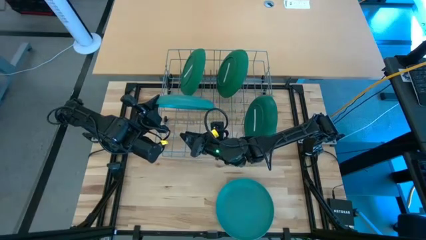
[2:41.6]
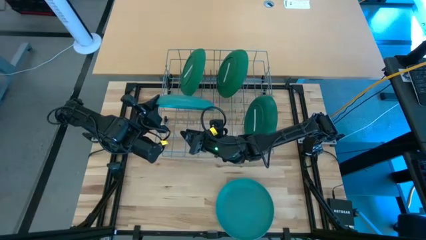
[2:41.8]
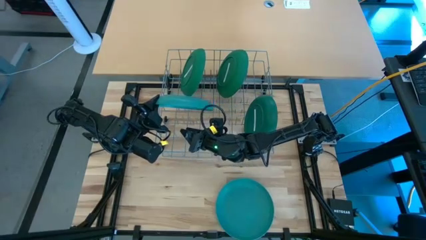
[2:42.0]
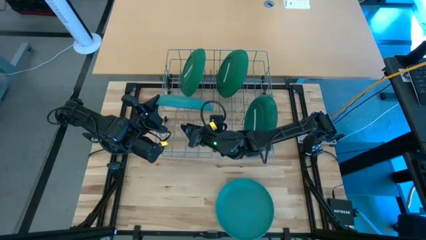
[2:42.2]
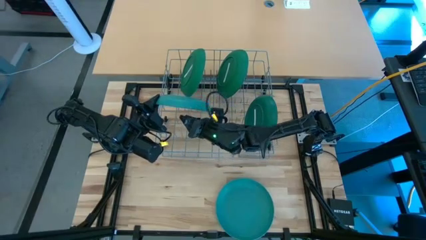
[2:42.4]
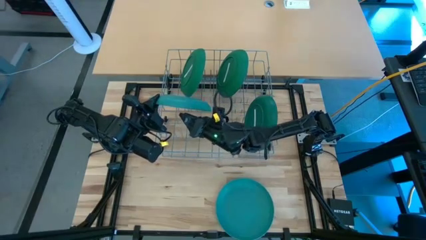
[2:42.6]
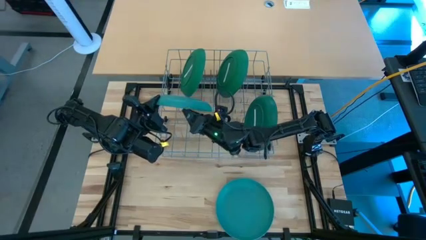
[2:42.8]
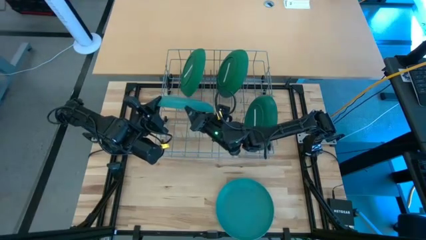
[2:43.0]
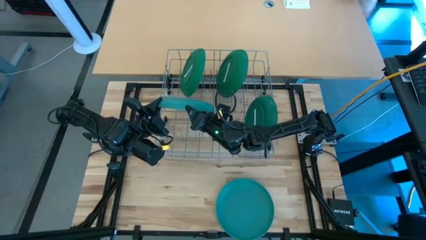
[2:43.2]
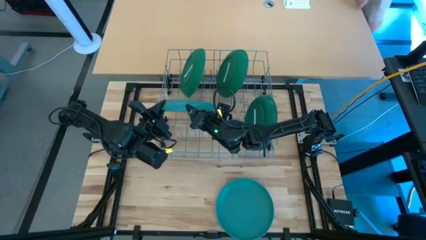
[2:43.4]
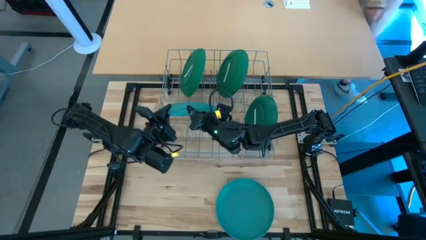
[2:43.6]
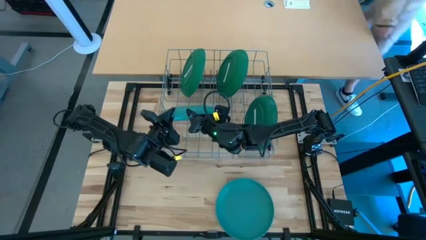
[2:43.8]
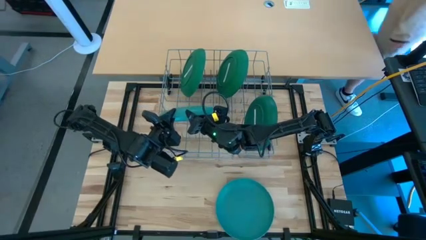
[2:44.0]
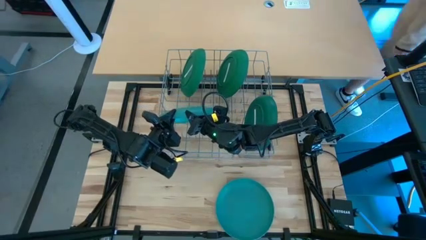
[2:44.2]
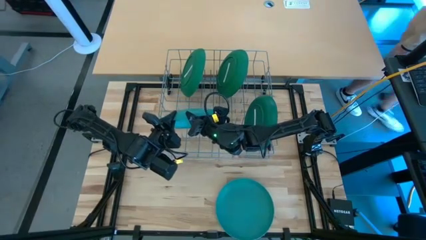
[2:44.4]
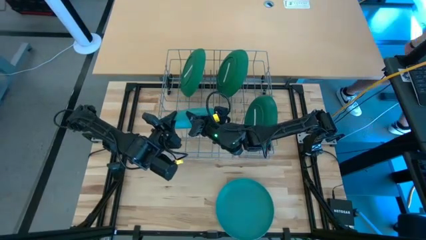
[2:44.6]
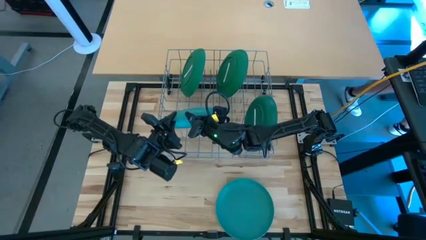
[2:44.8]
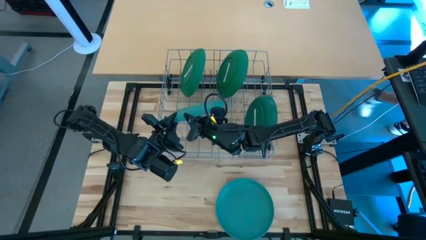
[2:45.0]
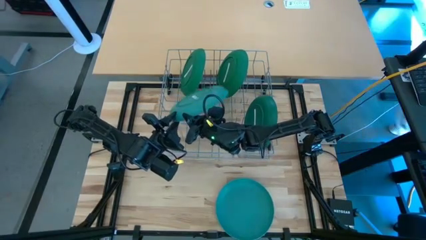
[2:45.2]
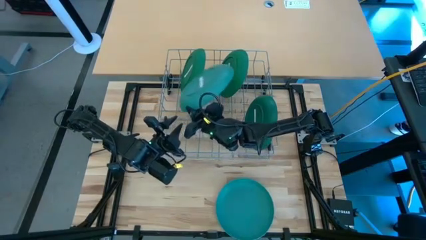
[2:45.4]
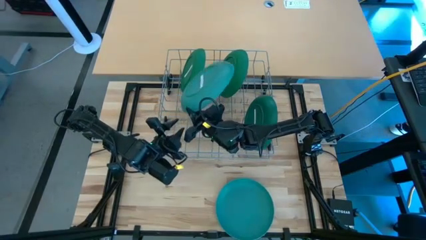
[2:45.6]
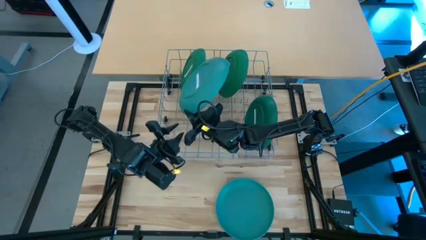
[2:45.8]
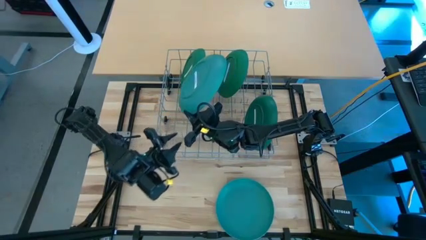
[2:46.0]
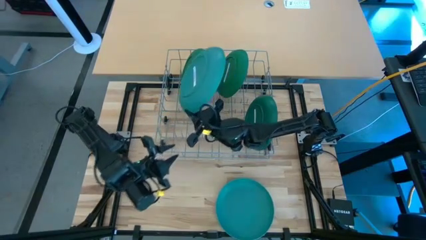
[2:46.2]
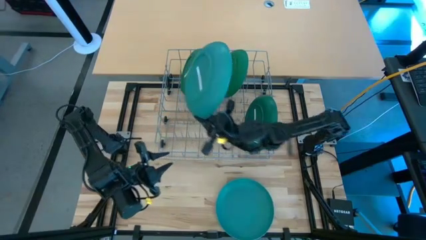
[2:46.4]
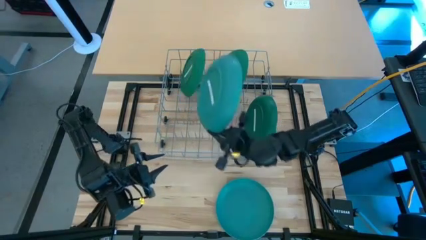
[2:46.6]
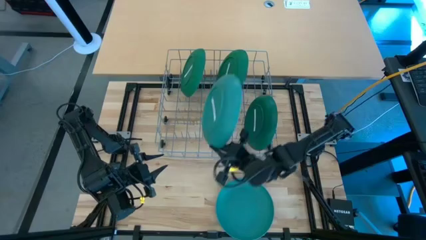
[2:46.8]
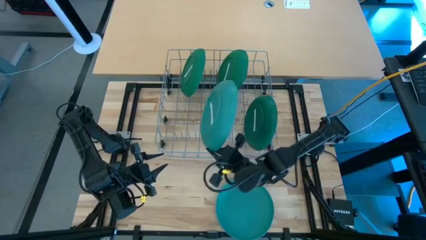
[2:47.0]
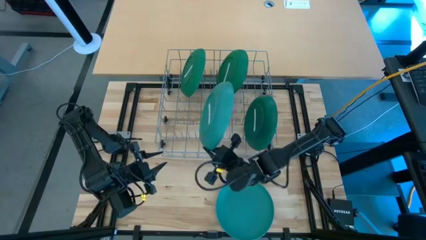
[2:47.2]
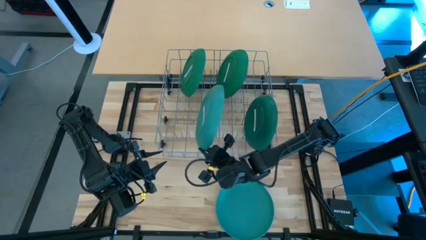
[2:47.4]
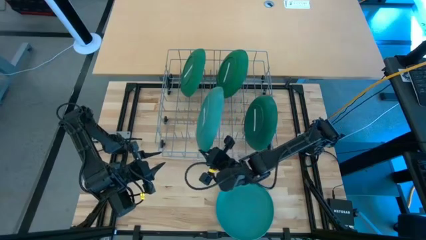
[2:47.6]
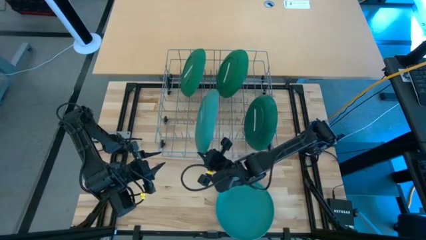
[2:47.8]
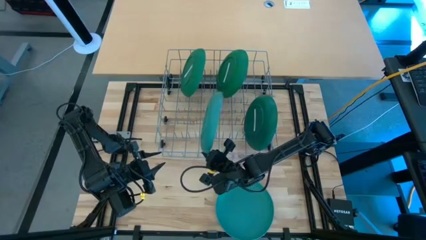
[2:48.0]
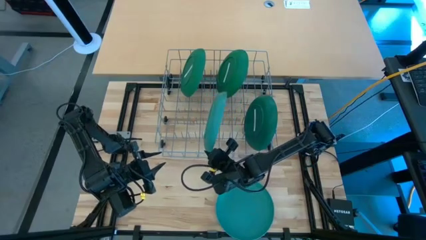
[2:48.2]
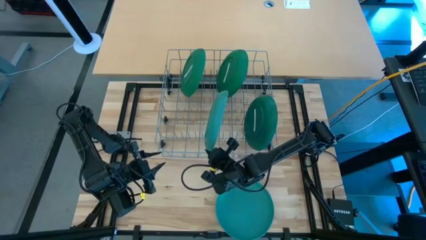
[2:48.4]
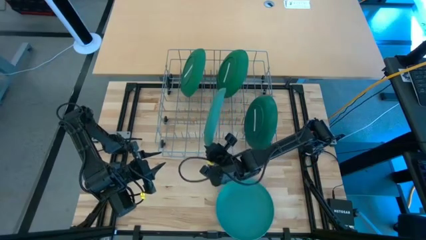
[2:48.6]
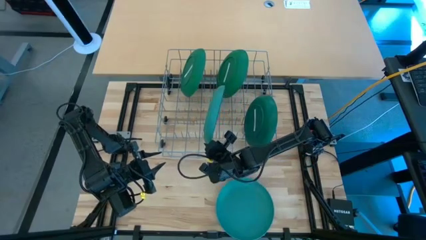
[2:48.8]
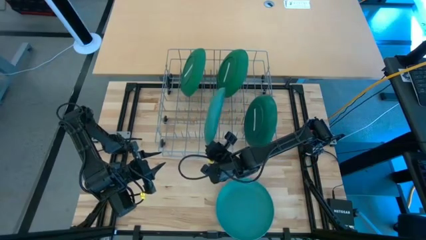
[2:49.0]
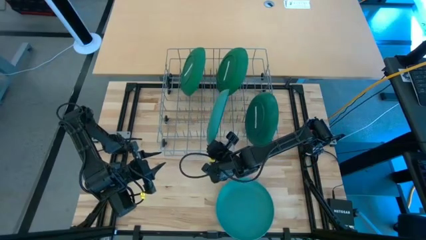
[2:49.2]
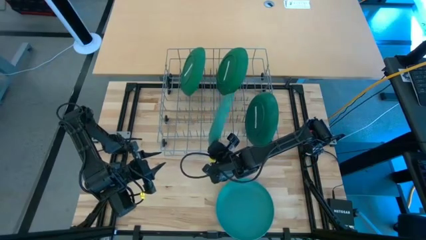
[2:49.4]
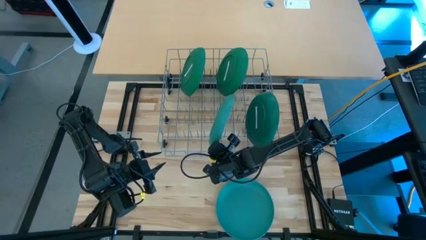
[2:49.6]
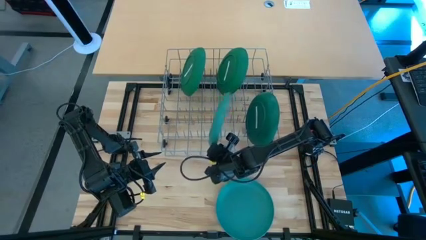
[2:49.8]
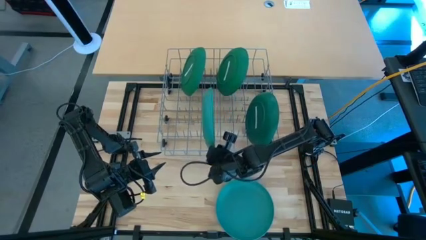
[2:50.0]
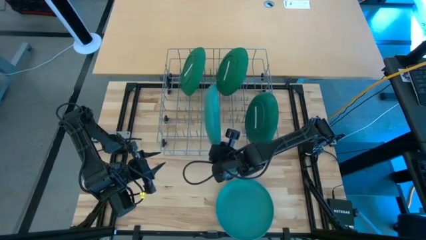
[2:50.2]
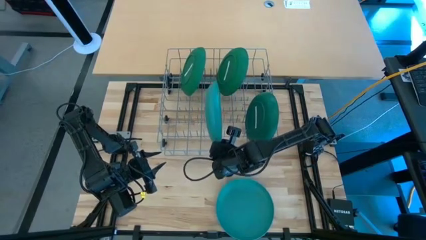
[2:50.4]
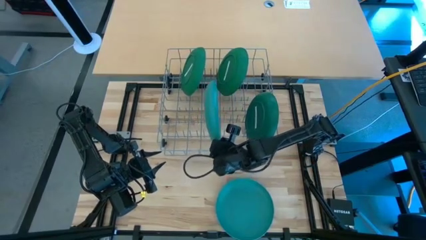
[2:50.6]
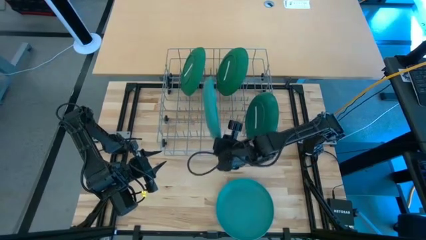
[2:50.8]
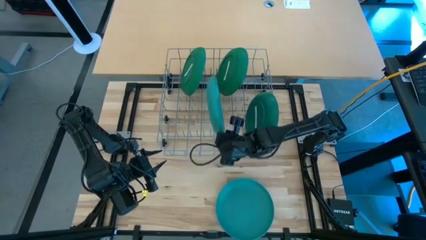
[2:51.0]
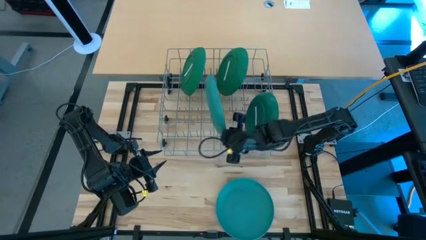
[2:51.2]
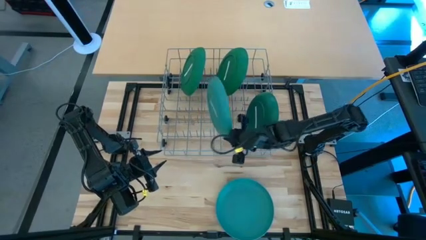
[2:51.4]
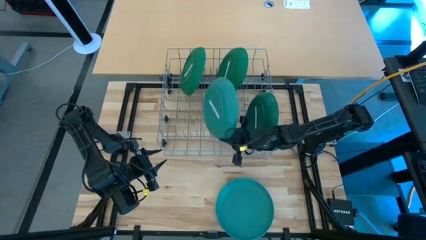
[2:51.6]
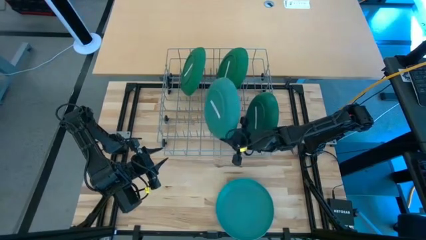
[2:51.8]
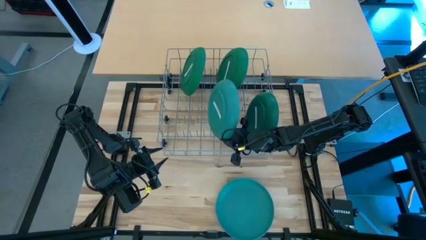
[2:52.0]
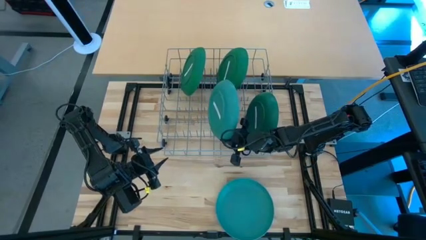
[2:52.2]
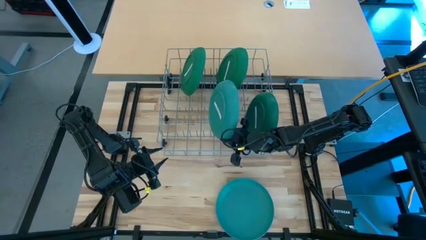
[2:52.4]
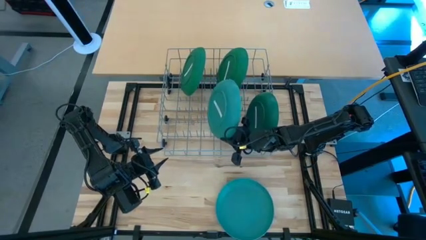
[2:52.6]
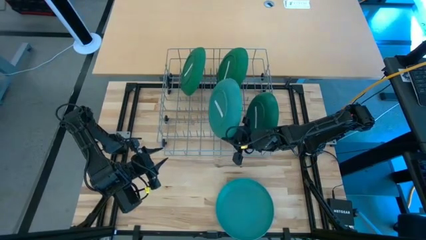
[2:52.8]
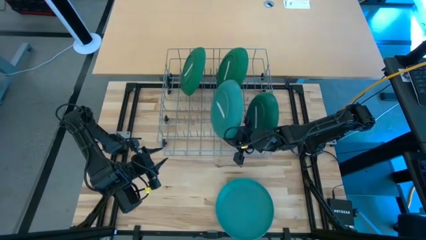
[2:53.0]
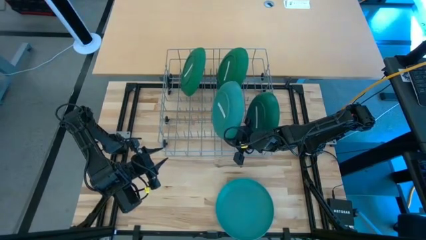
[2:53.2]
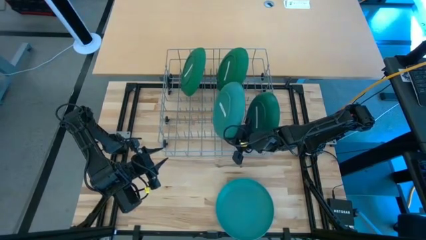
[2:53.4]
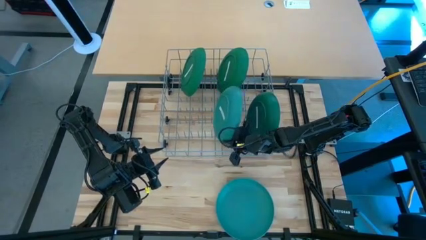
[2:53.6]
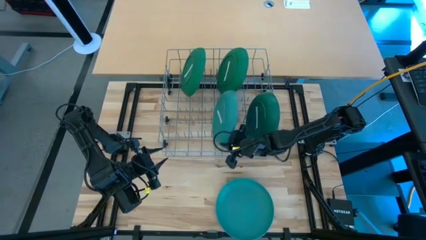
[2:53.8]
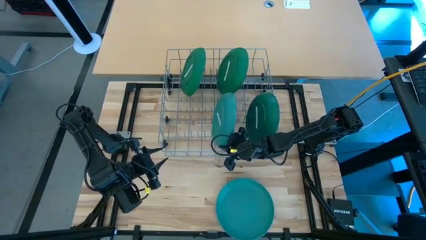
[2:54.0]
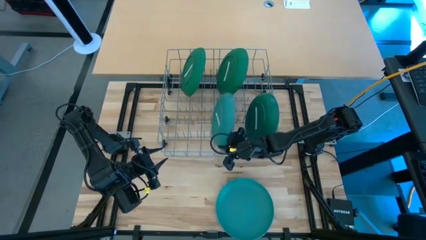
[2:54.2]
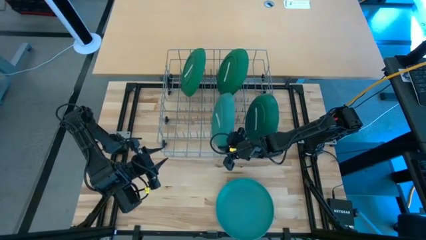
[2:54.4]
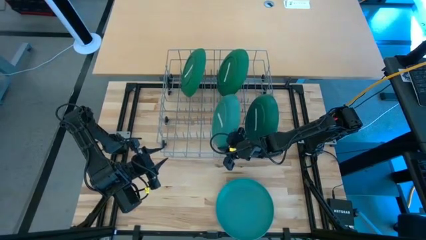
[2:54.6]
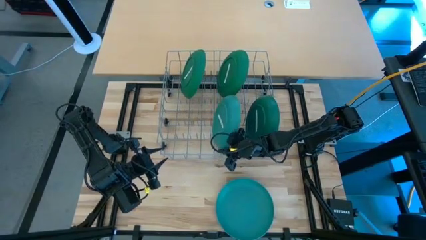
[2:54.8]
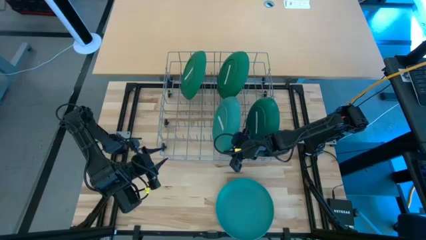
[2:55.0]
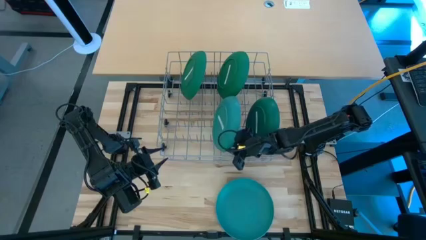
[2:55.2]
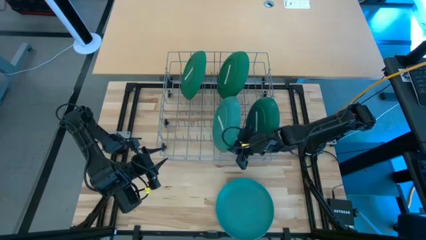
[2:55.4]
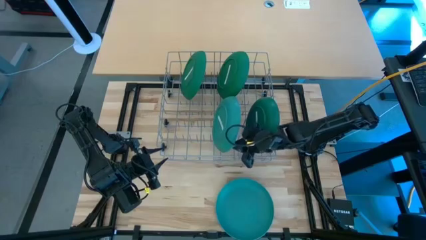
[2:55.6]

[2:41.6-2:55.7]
Task: Sort dishes
Put the top light green plate in the dish rack
